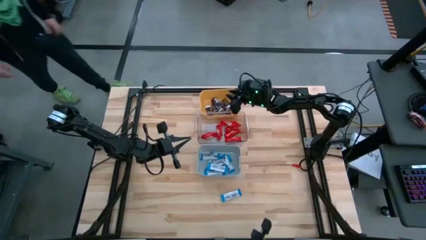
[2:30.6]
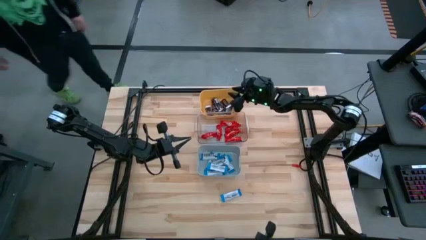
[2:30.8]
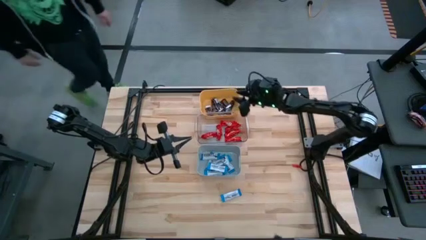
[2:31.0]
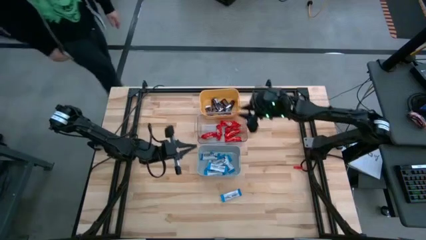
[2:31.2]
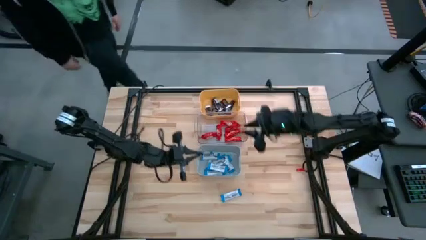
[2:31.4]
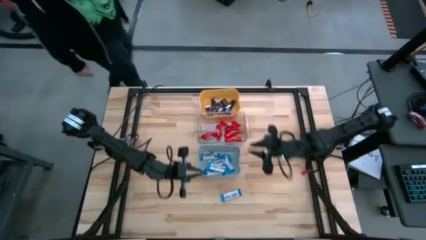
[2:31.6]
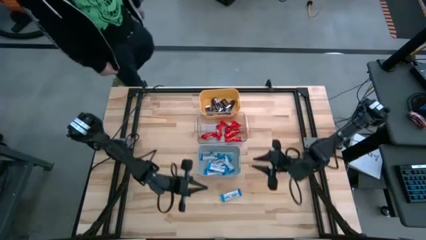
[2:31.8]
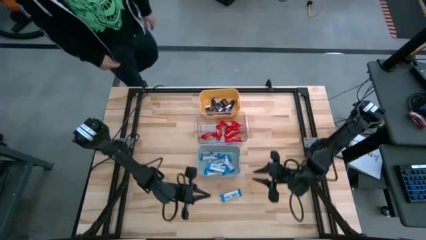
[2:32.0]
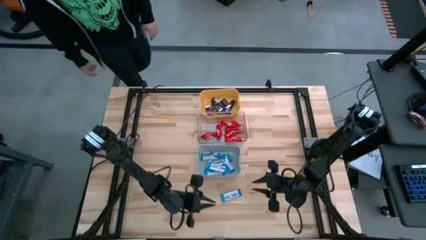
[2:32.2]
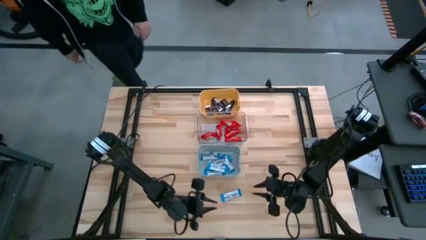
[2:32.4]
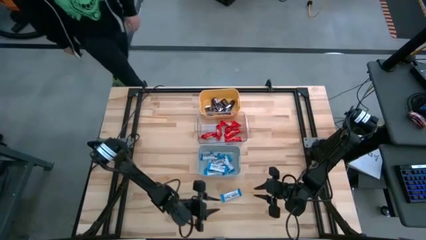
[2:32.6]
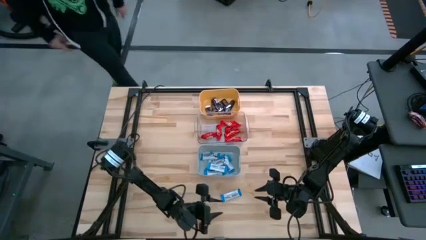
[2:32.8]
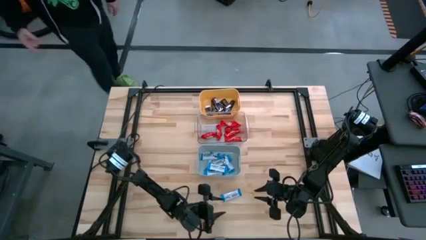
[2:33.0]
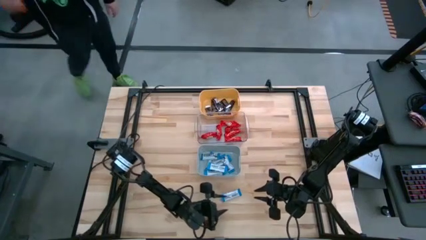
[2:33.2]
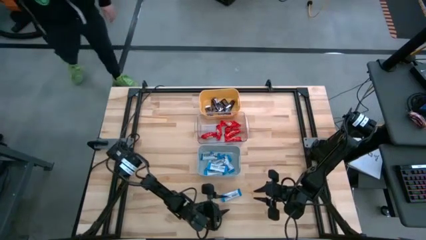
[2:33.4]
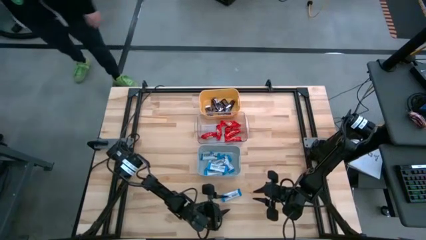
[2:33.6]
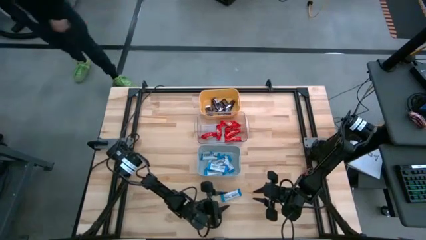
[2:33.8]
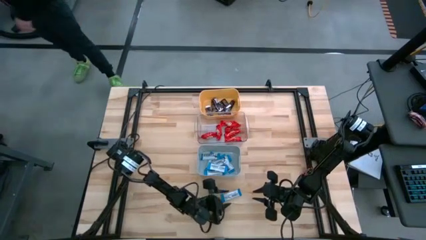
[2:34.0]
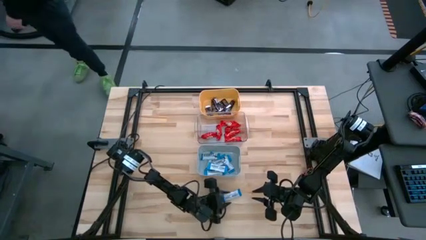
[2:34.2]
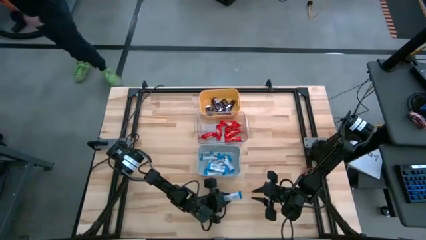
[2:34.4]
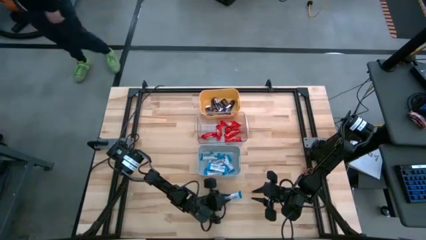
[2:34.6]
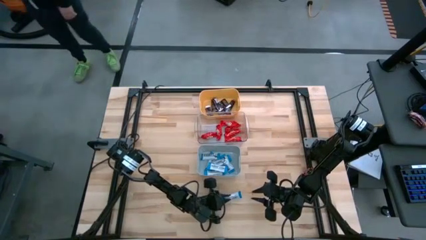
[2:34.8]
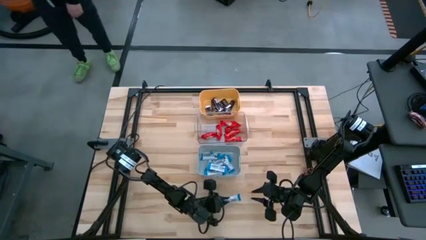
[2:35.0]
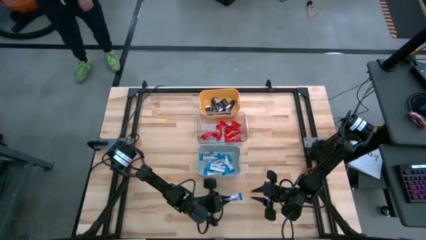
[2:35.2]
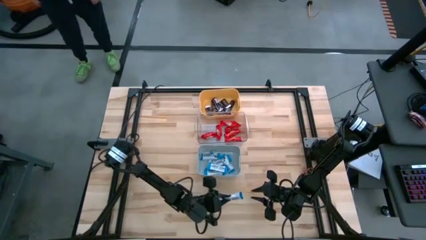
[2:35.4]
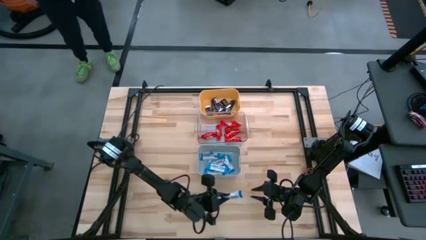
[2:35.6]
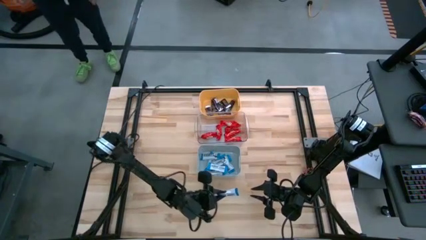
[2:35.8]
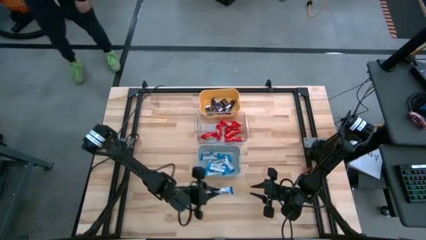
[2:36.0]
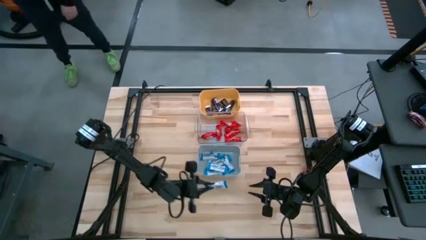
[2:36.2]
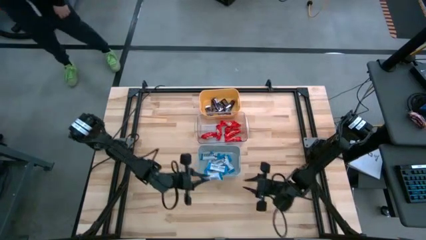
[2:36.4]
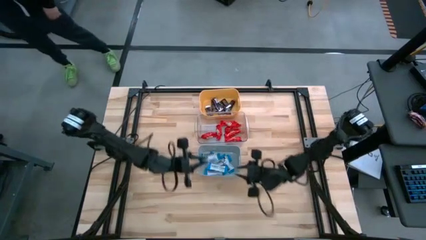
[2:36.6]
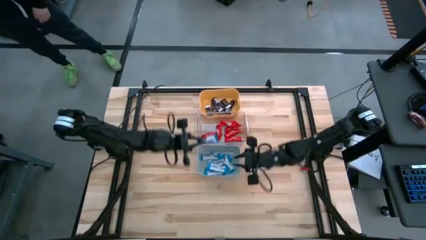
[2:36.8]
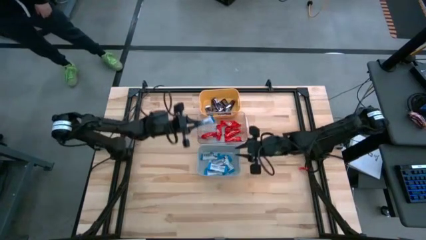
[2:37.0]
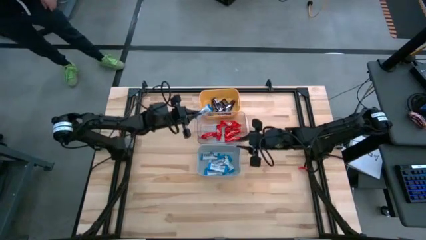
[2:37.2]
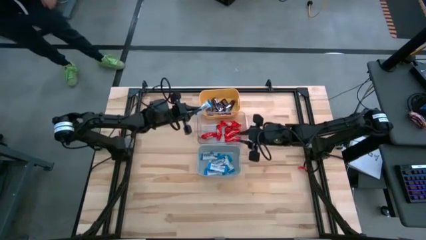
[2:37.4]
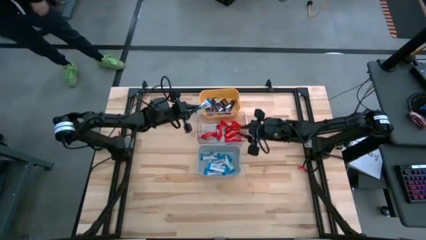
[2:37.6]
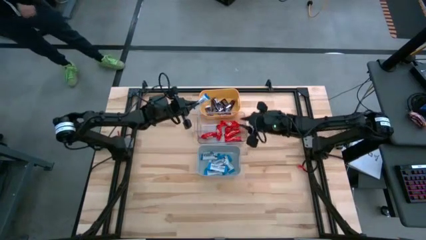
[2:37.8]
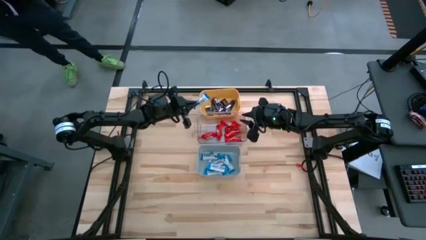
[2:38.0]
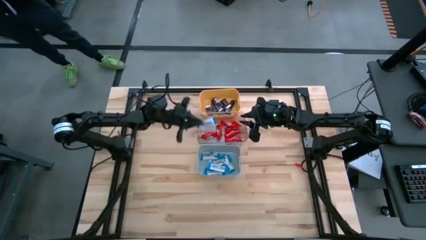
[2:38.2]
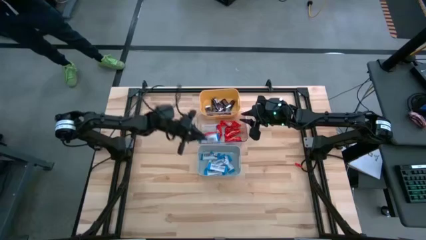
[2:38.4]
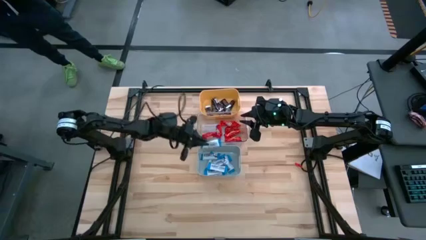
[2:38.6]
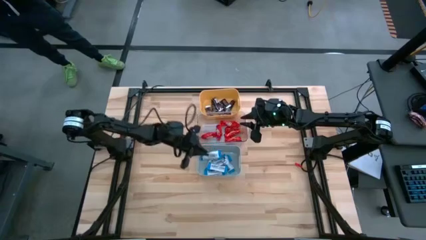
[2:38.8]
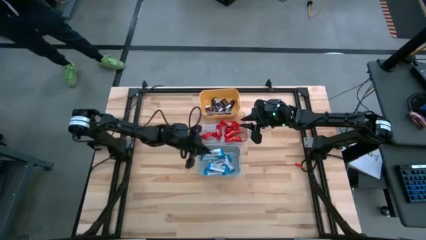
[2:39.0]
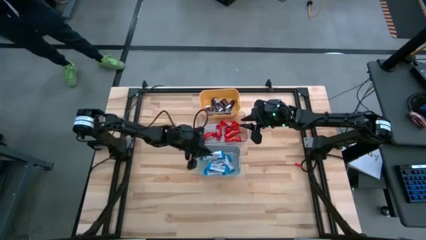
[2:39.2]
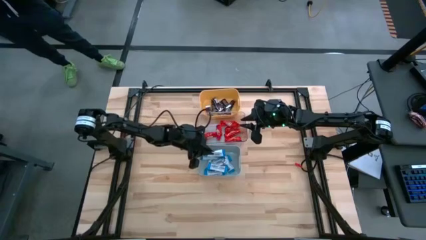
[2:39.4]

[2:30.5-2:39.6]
Task: Organize candy in baskets
Put the white chocolate bar into the gray bin

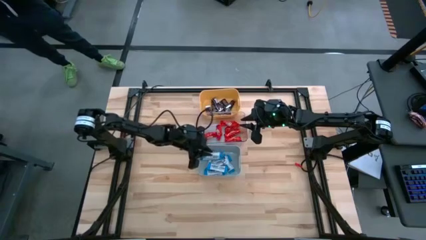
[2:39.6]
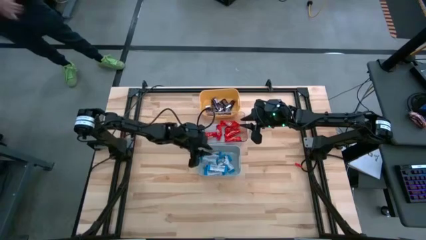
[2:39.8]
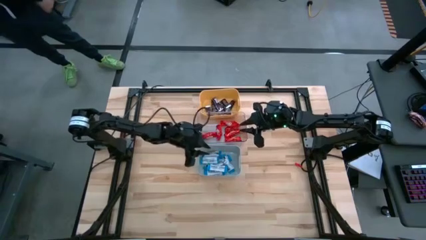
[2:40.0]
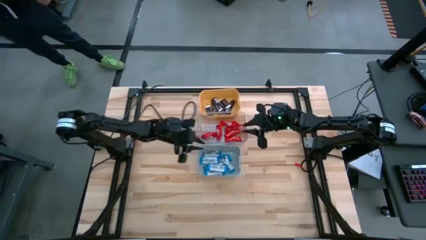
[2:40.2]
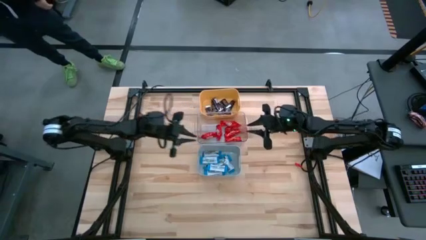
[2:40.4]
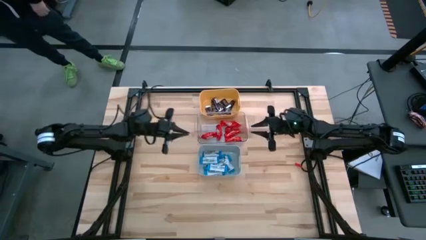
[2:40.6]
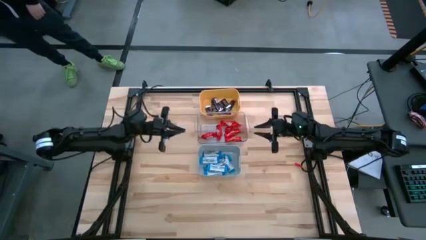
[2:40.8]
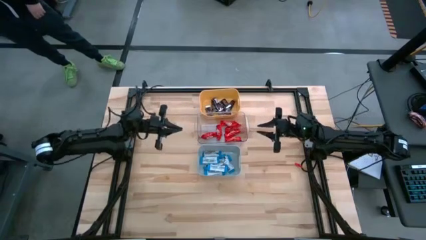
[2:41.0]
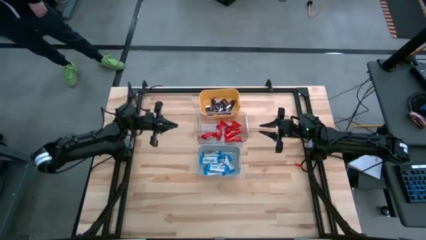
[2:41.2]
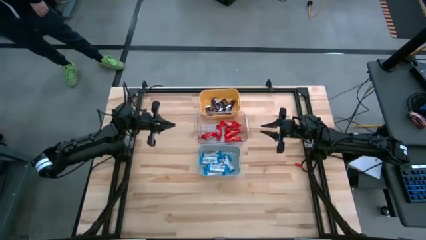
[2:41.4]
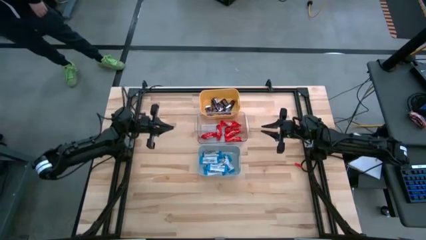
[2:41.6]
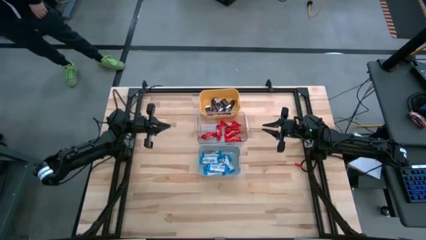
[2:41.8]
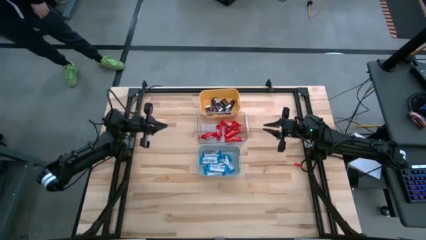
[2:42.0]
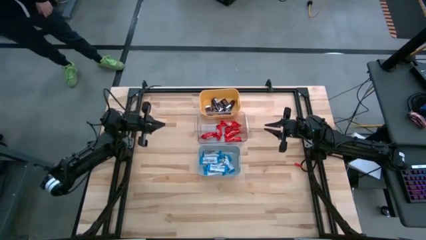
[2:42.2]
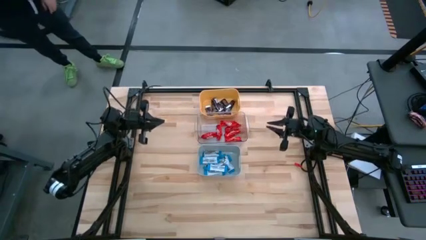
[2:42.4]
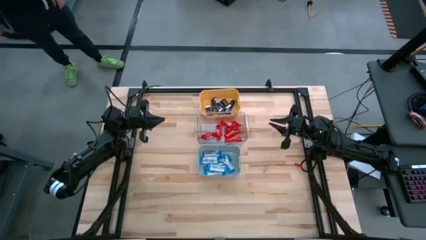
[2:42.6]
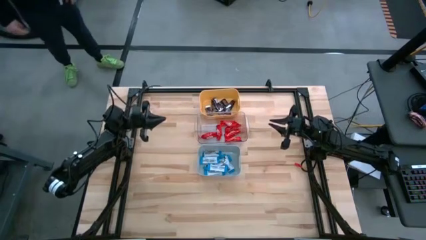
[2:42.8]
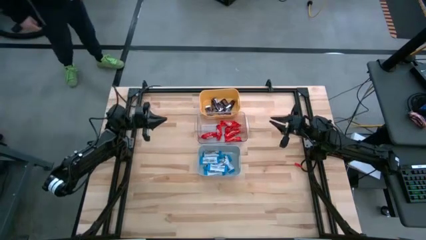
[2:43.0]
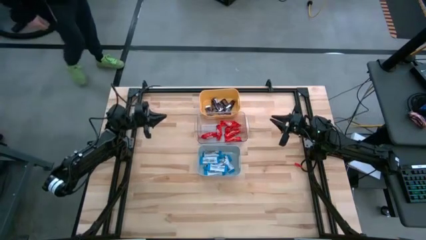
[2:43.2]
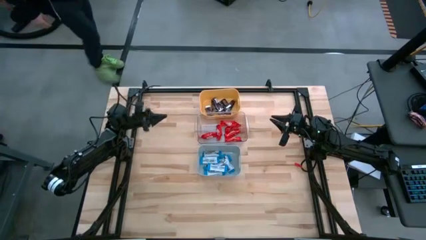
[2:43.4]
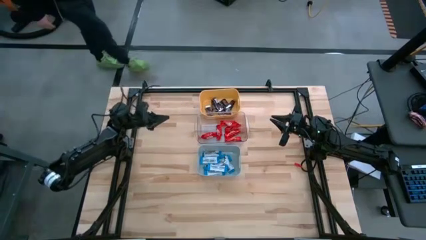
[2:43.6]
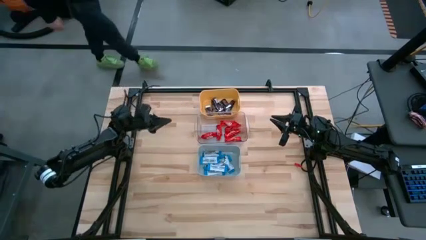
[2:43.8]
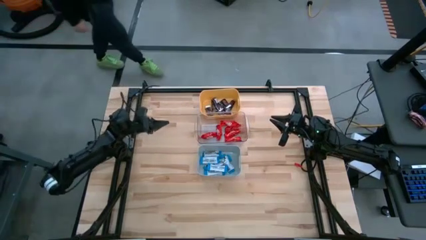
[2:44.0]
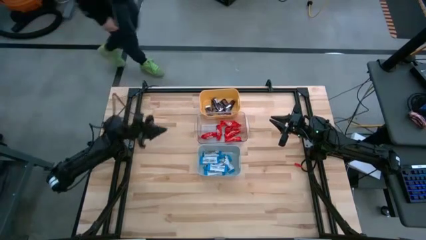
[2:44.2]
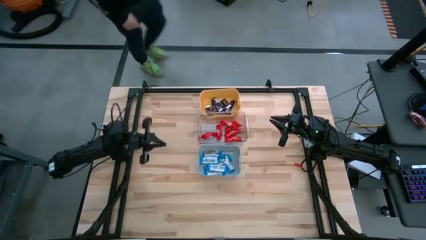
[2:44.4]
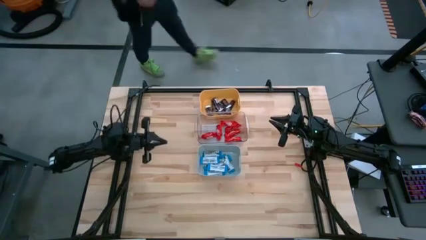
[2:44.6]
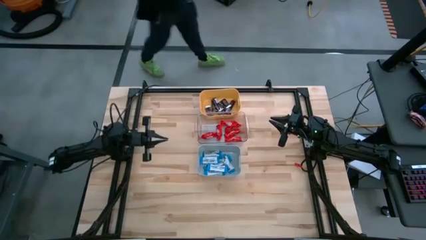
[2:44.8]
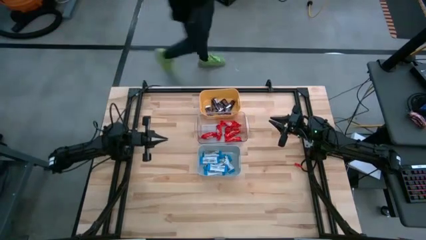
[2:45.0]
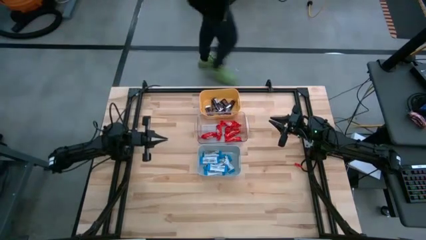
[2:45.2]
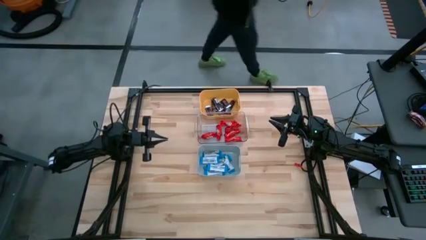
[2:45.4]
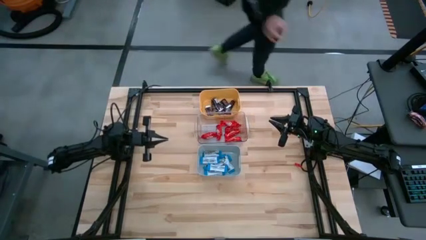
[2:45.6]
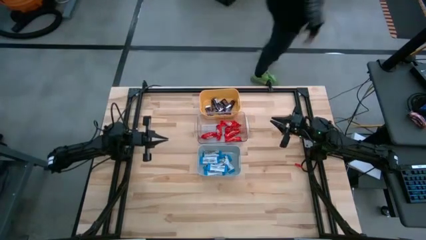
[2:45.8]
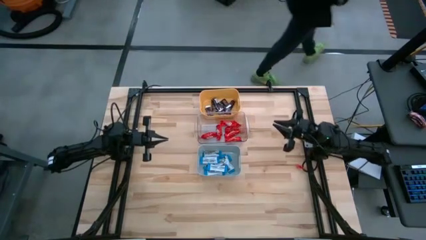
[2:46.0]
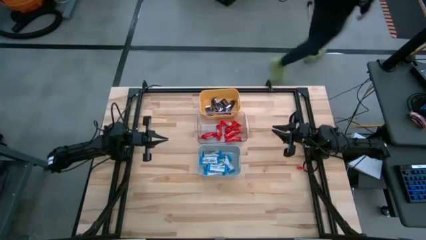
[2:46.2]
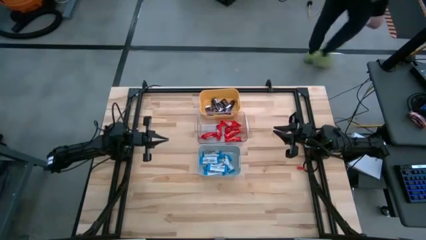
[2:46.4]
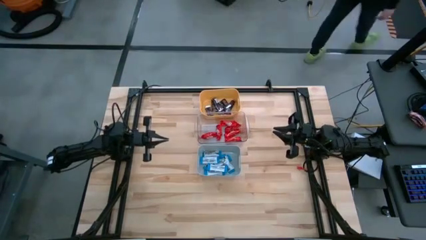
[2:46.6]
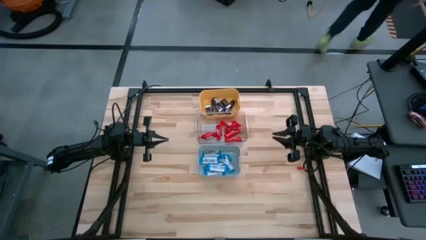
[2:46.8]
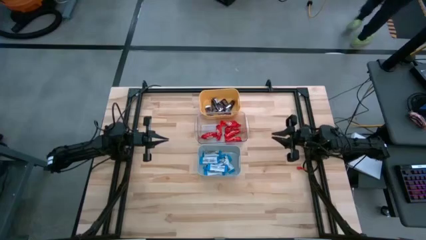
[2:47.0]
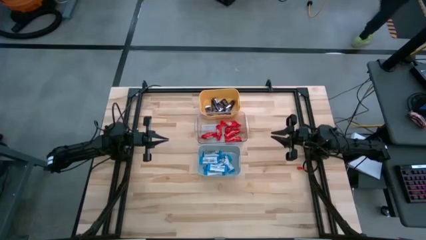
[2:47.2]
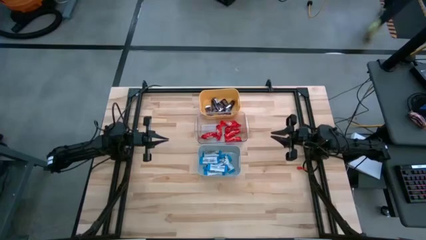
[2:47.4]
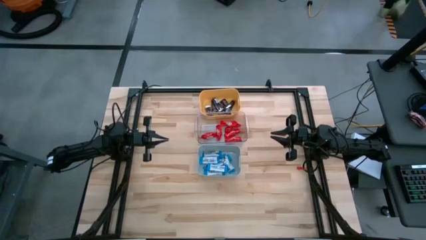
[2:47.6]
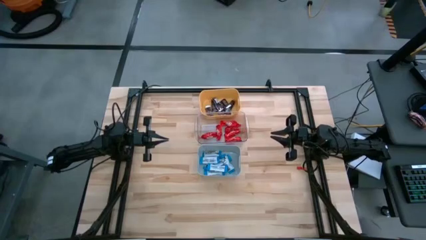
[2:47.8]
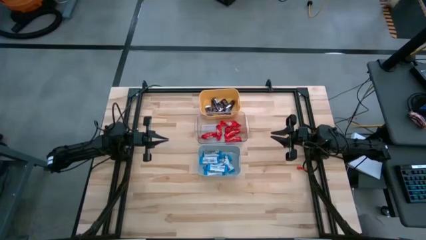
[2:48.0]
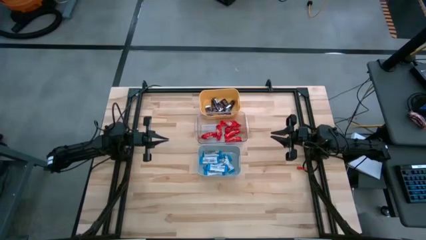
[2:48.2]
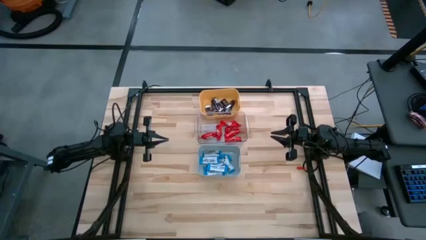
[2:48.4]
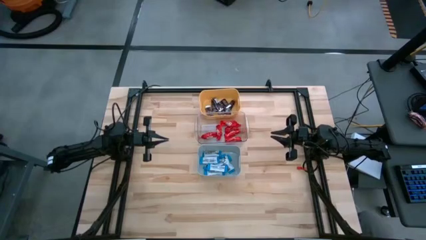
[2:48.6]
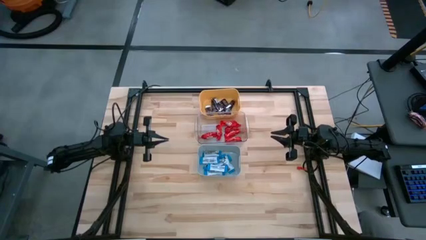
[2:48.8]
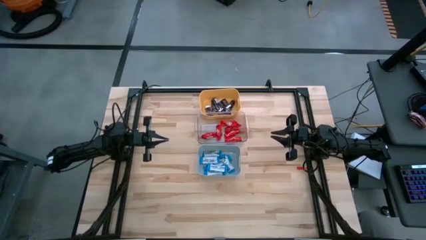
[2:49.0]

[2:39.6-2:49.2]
Return to Home Position
